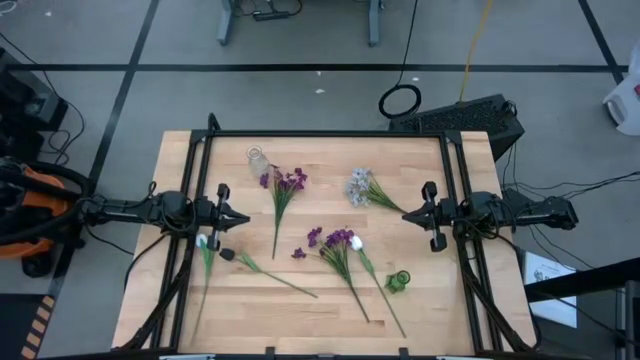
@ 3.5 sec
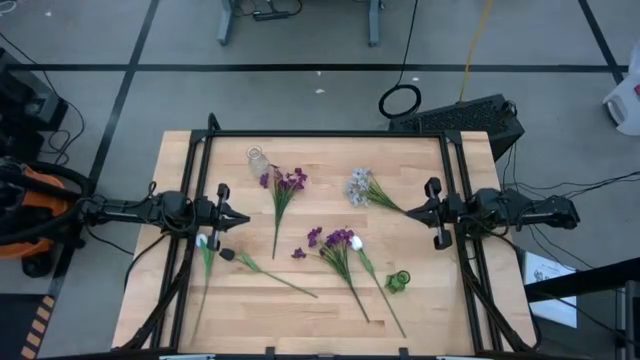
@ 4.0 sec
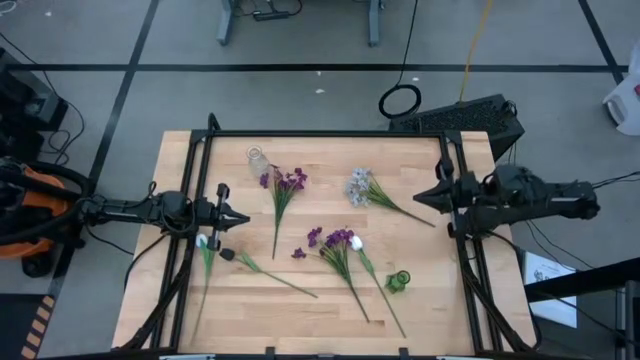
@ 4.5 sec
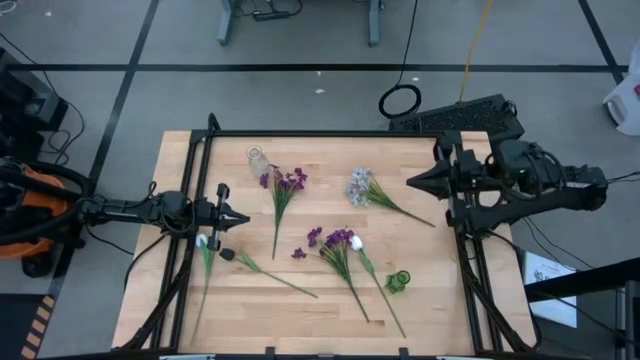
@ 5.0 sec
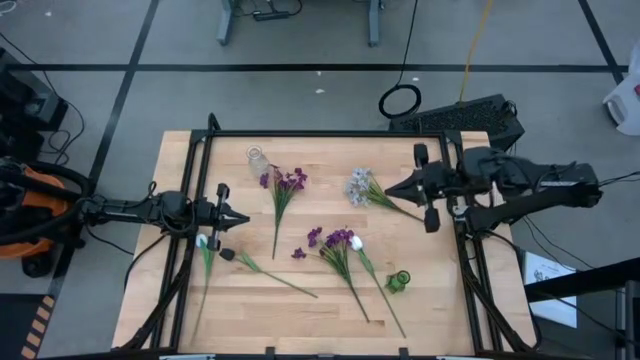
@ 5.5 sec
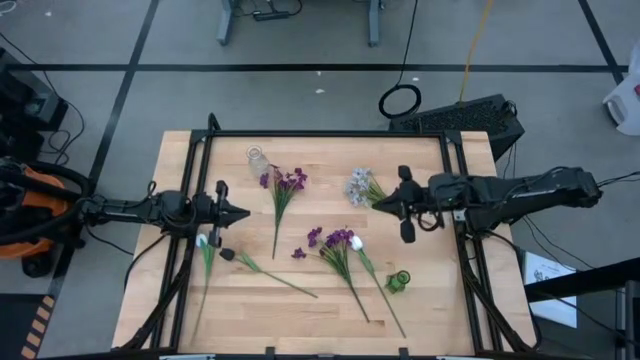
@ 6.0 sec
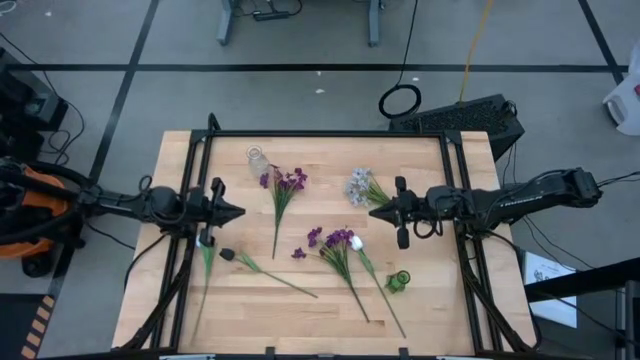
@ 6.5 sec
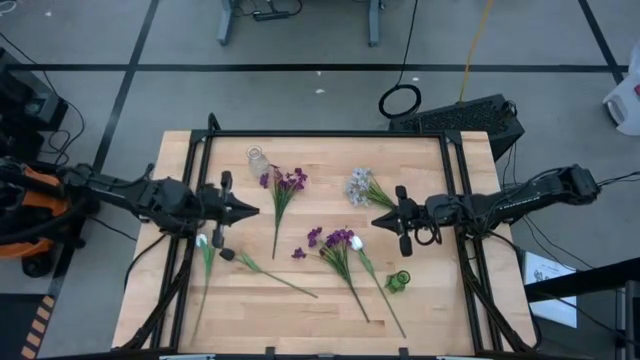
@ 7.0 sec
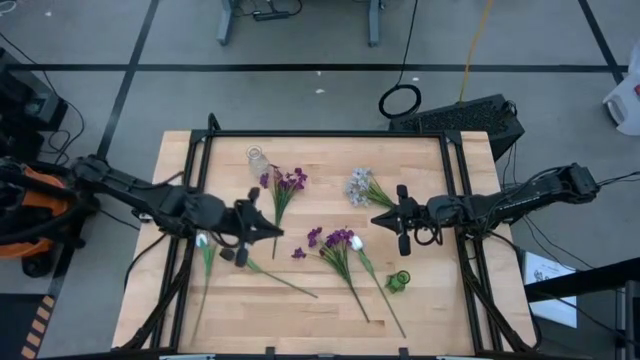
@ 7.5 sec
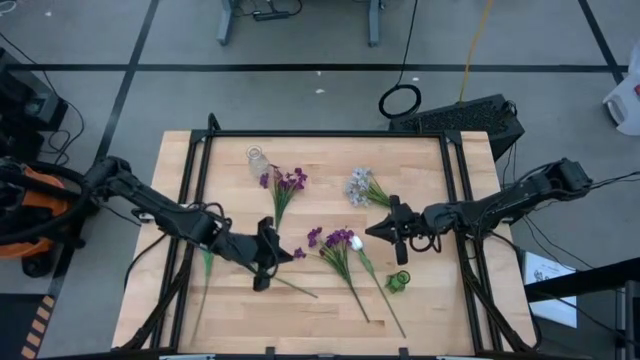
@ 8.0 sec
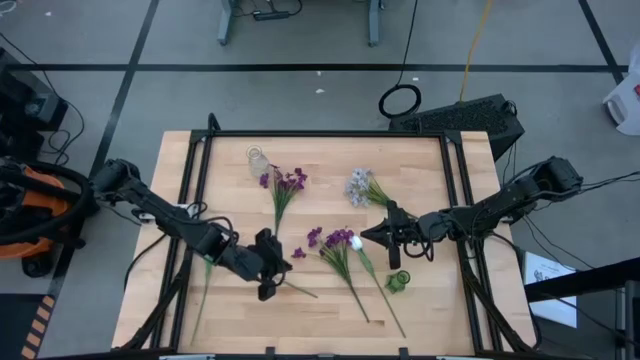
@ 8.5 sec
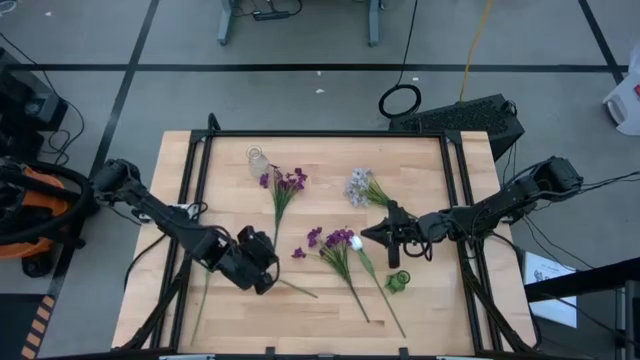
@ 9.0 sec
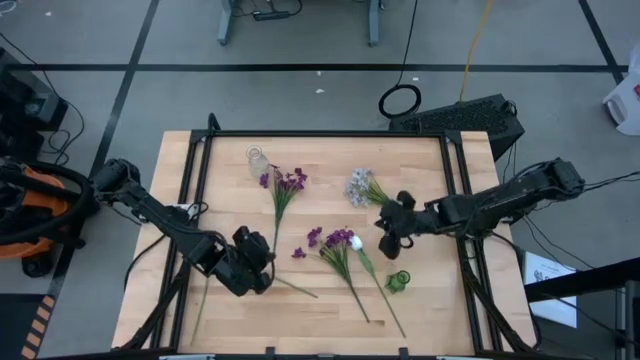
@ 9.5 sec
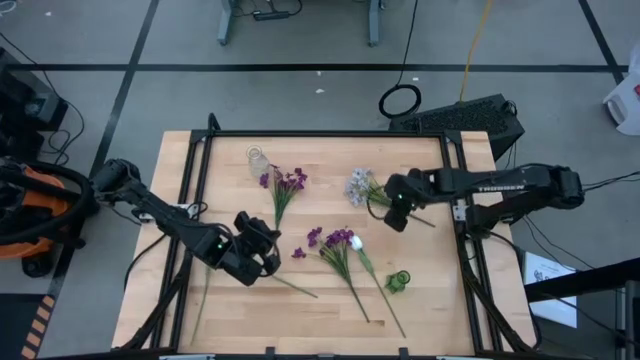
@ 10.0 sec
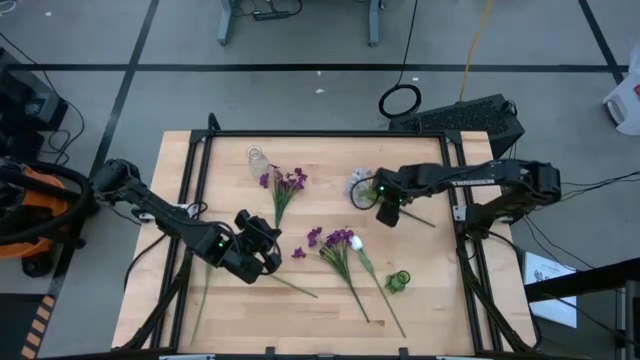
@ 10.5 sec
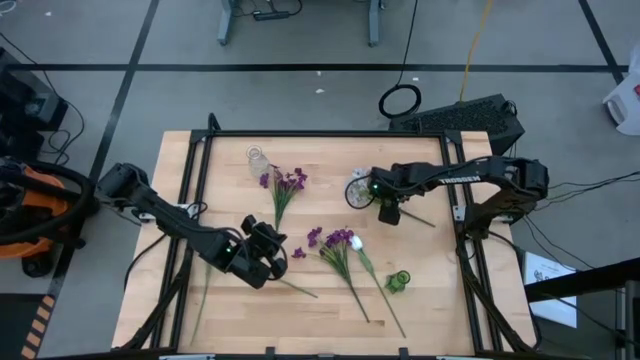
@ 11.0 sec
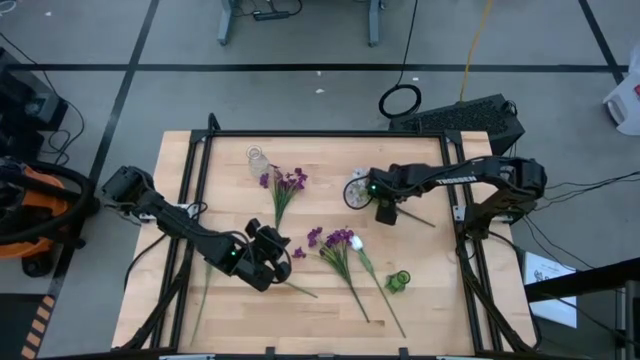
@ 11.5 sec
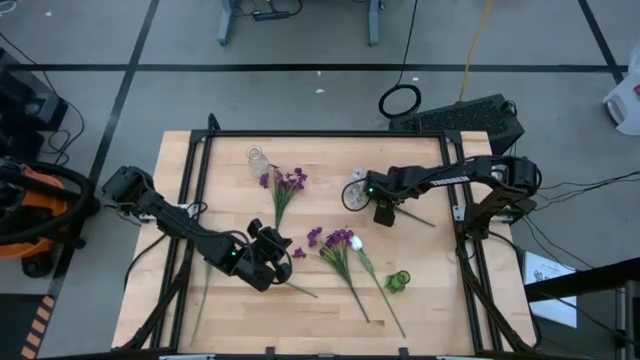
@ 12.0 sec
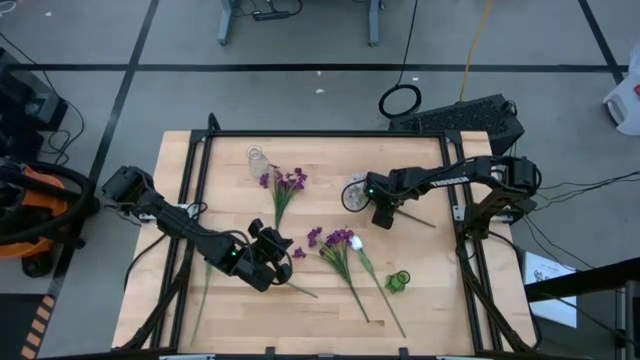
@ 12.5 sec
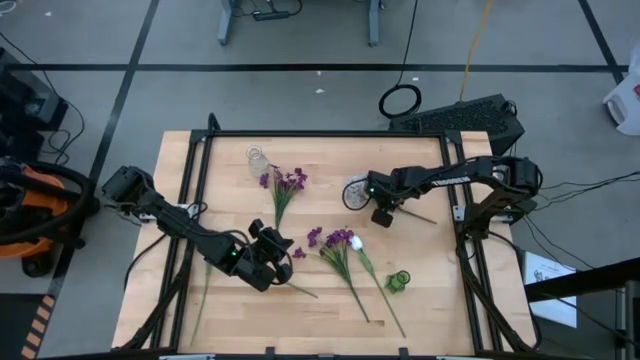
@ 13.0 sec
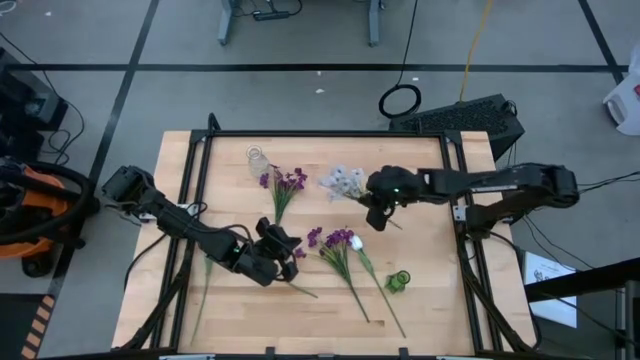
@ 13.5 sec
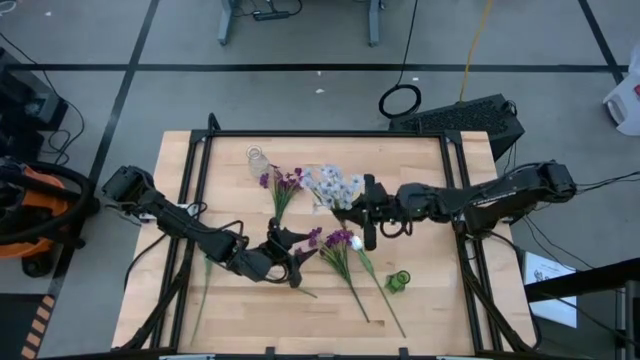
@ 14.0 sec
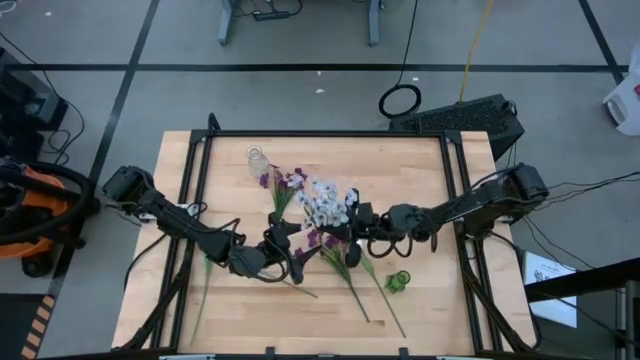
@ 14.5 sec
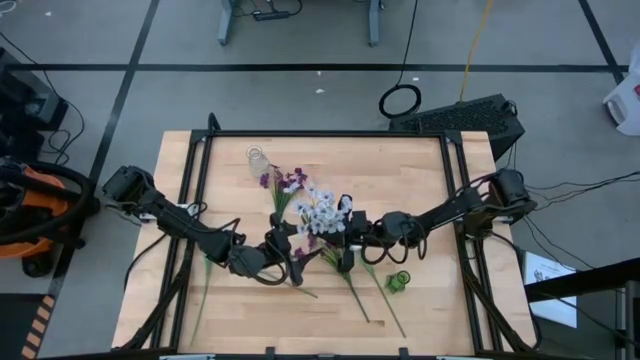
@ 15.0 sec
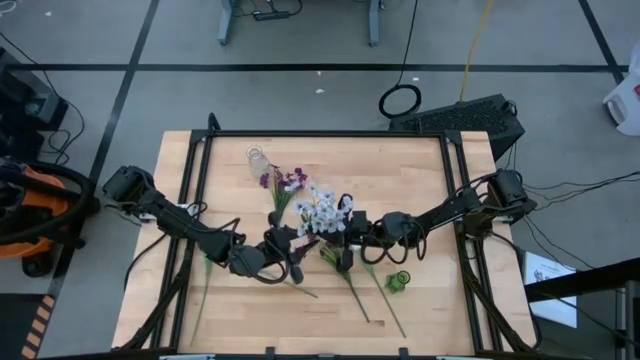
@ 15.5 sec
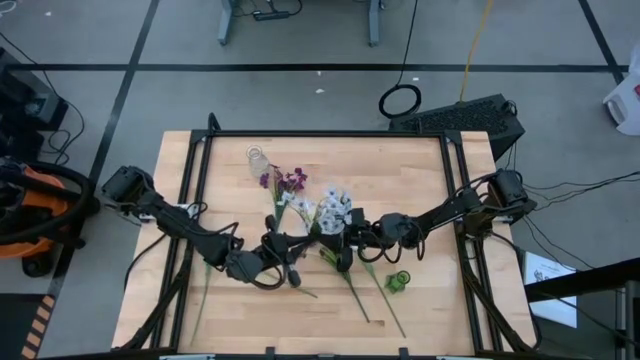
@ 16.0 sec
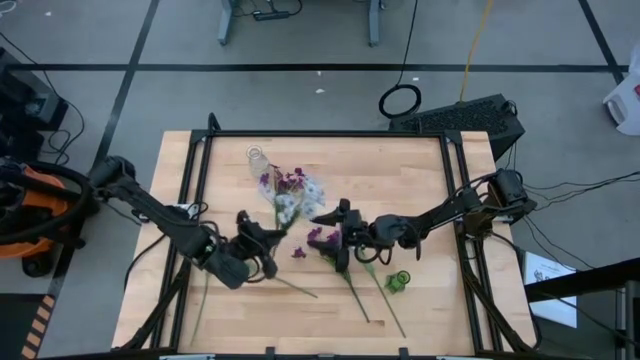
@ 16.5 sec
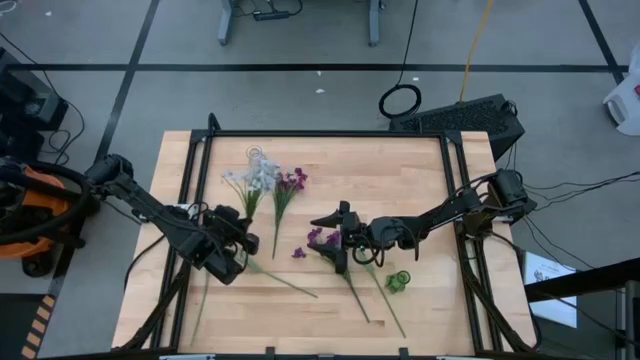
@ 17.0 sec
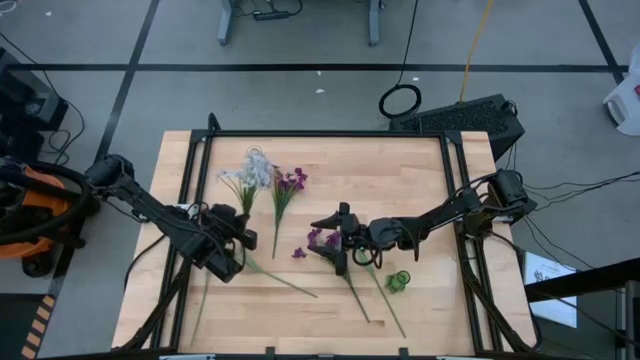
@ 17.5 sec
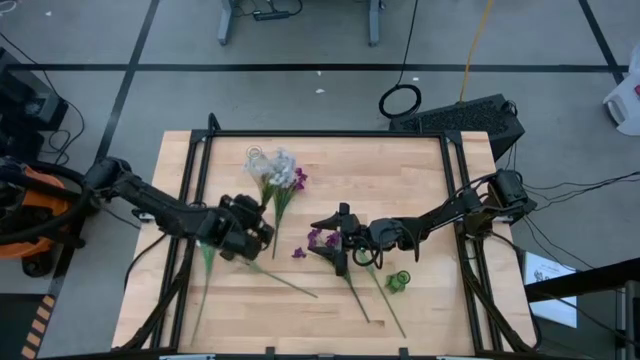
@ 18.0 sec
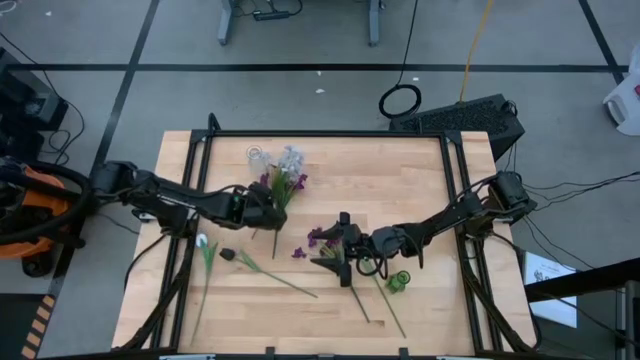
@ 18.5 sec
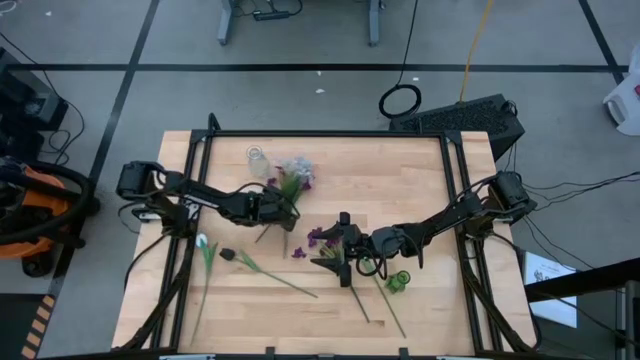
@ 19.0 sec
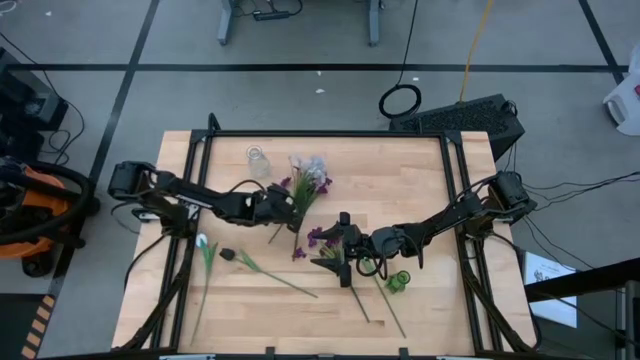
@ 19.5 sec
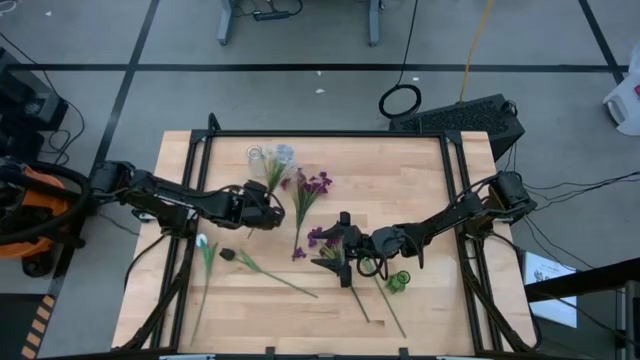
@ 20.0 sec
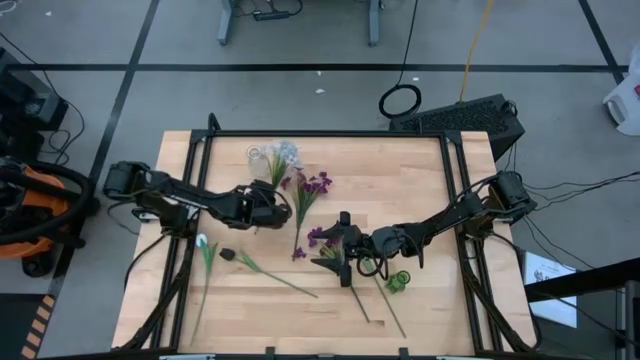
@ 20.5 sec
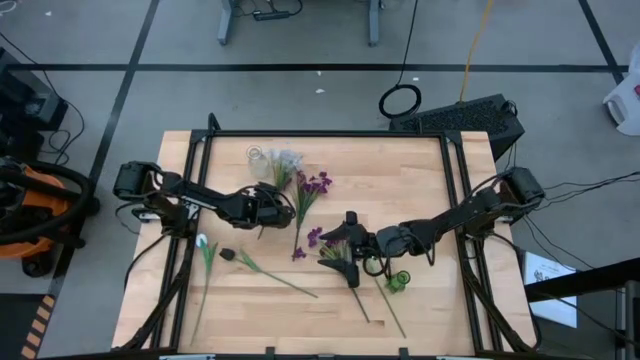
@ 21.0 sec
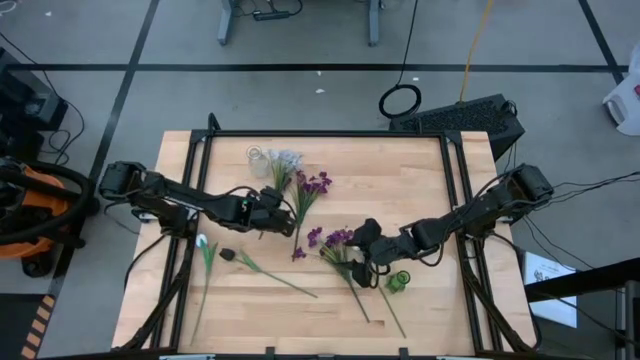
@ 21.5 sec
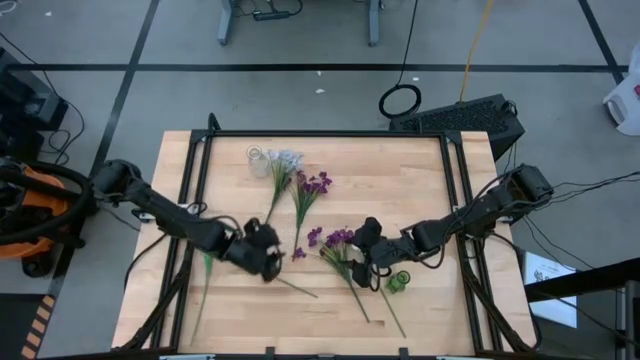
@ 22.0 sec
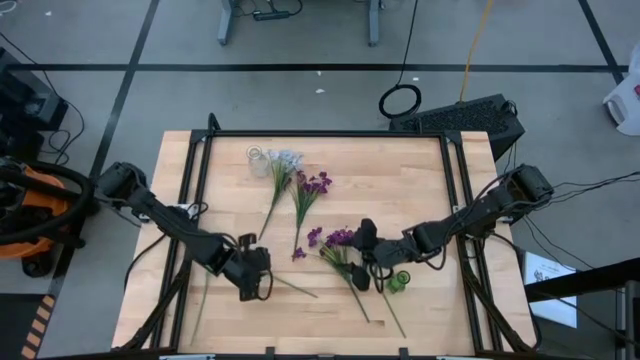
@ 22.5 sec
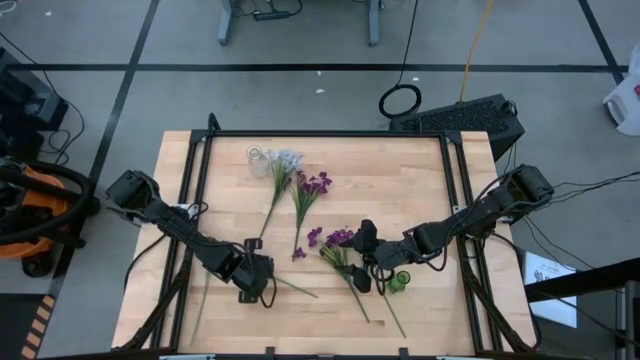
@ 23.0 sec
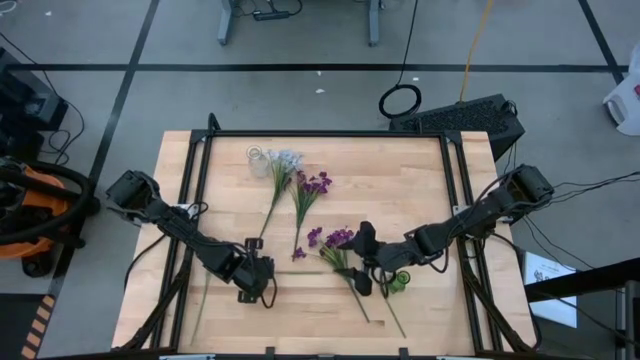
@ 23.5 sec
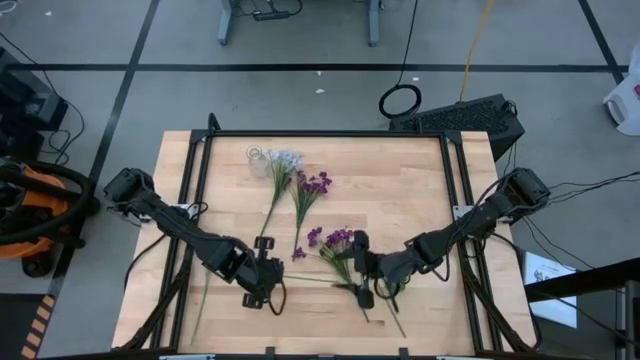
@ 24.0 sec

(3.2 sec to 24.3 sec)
Task: Sort flowers into vase by color
Prepare the flowers
